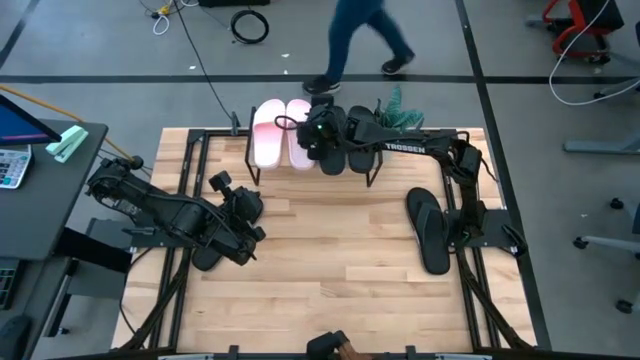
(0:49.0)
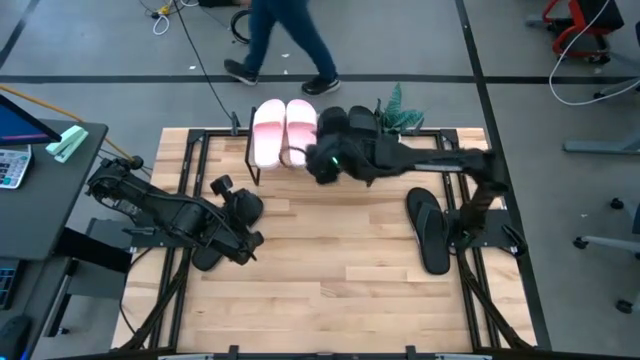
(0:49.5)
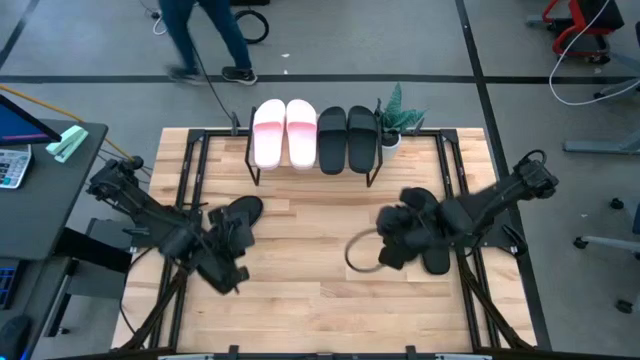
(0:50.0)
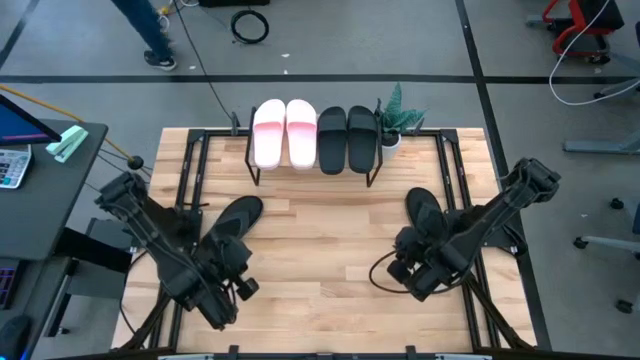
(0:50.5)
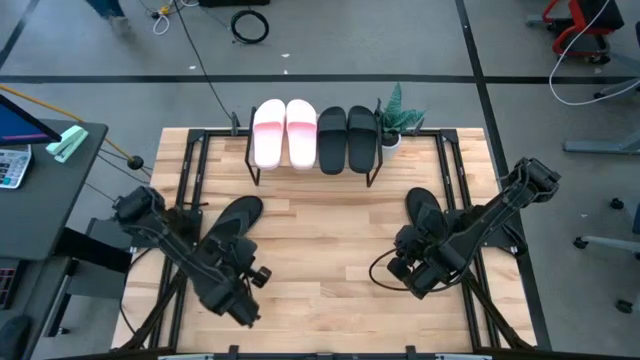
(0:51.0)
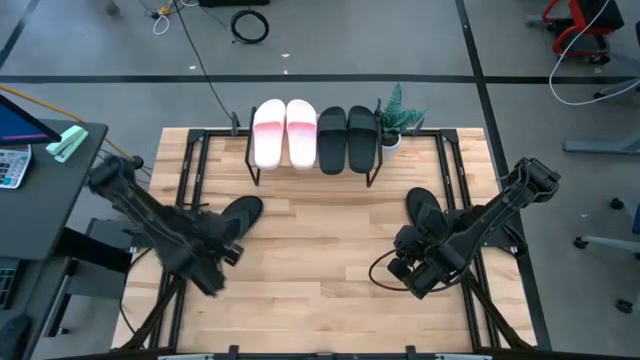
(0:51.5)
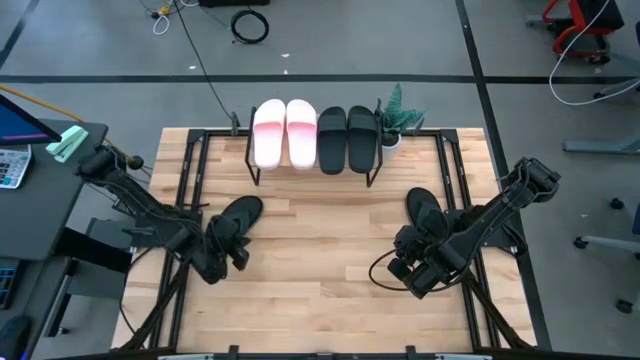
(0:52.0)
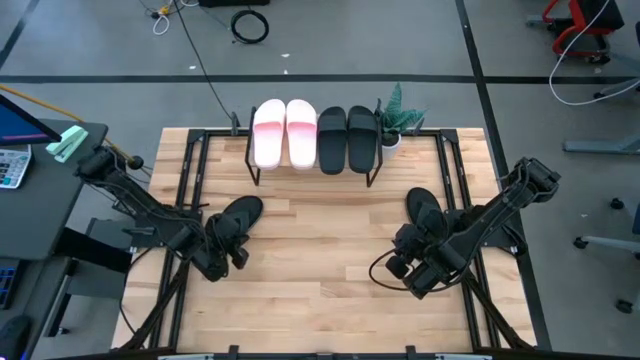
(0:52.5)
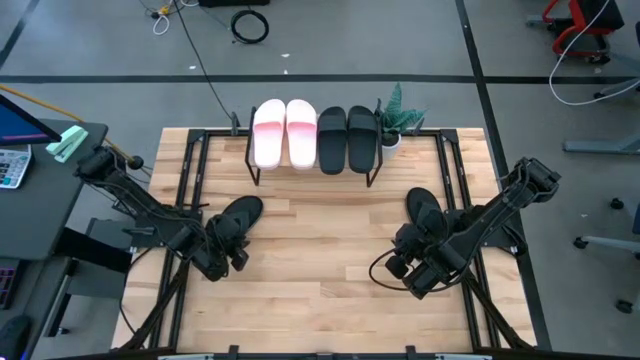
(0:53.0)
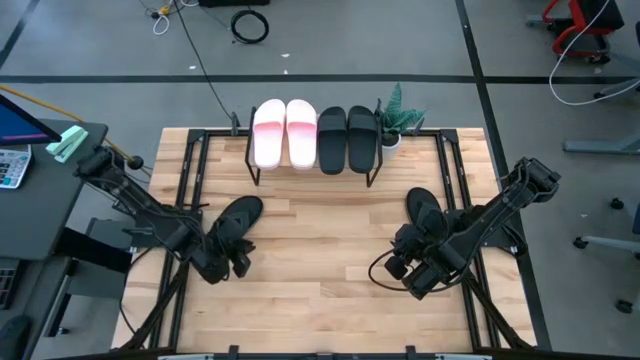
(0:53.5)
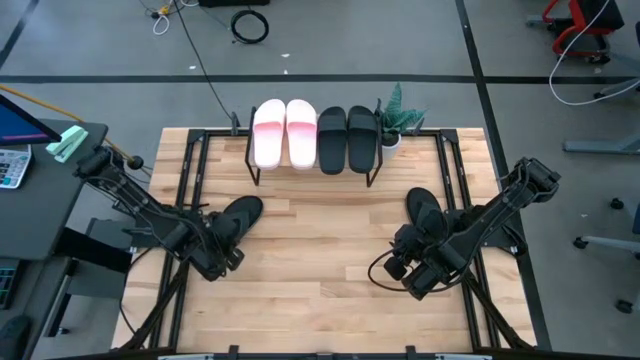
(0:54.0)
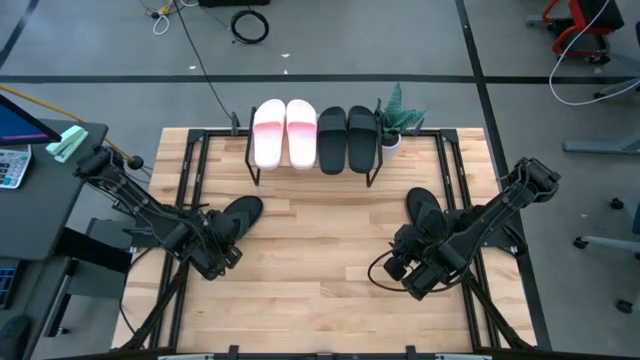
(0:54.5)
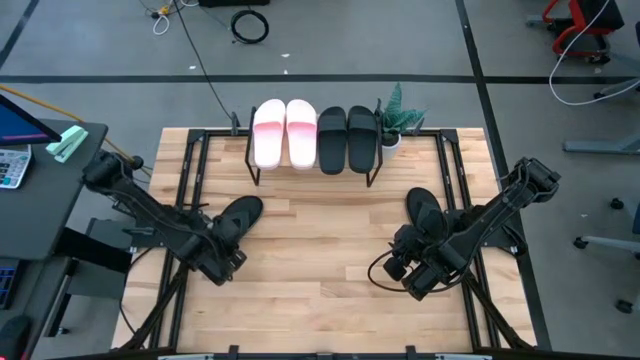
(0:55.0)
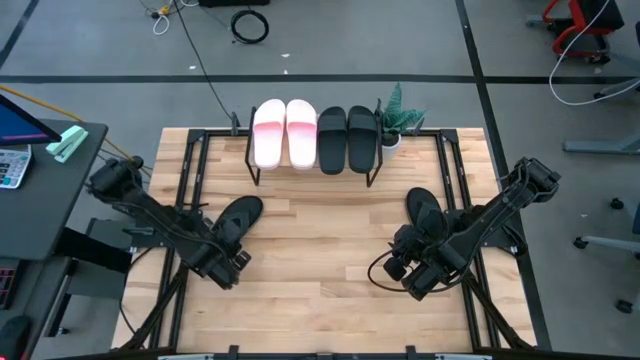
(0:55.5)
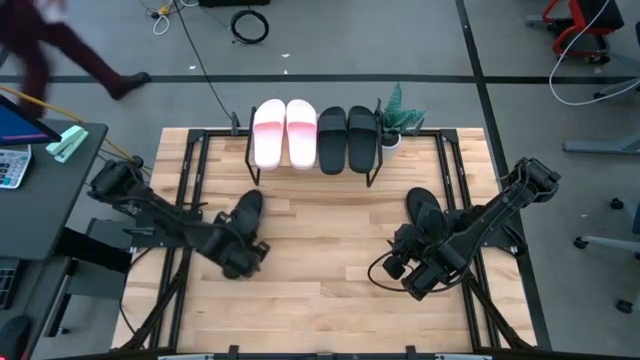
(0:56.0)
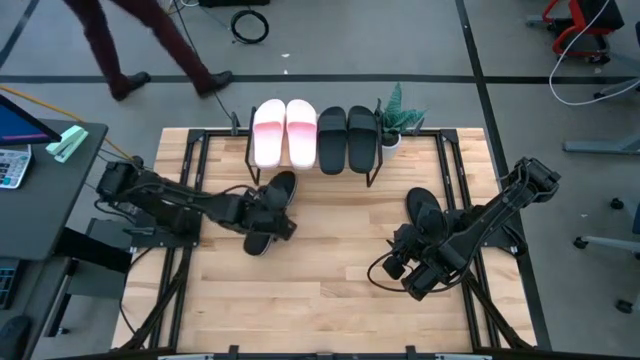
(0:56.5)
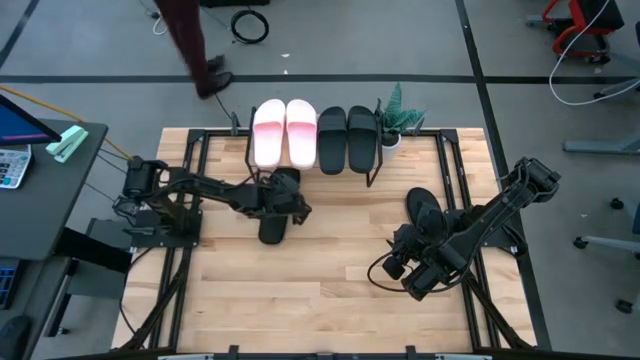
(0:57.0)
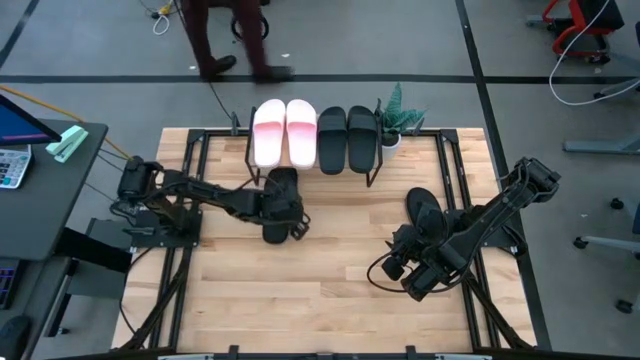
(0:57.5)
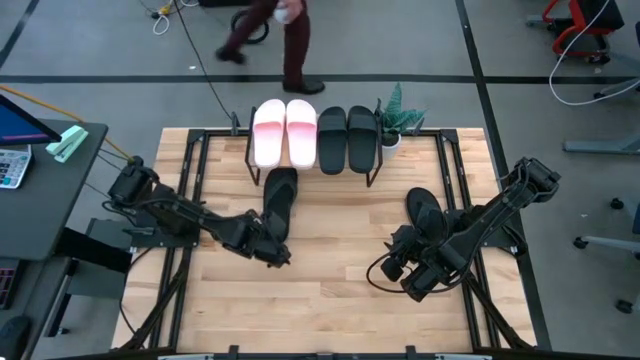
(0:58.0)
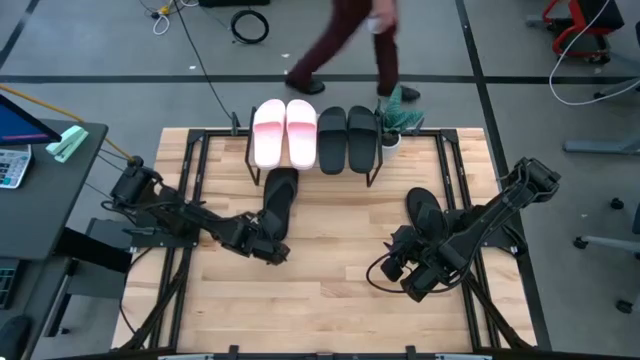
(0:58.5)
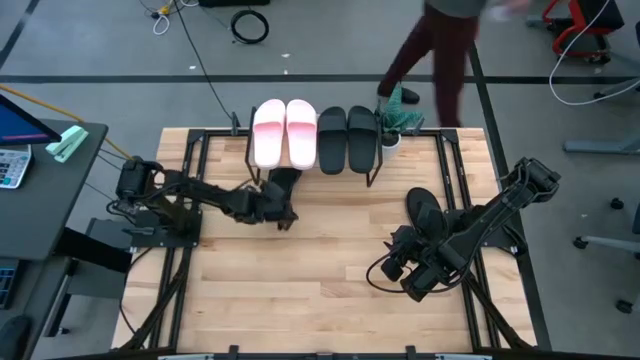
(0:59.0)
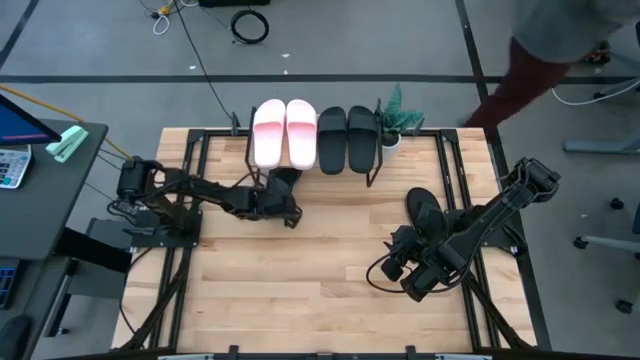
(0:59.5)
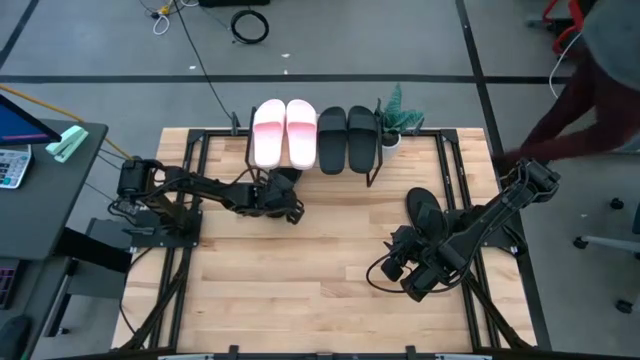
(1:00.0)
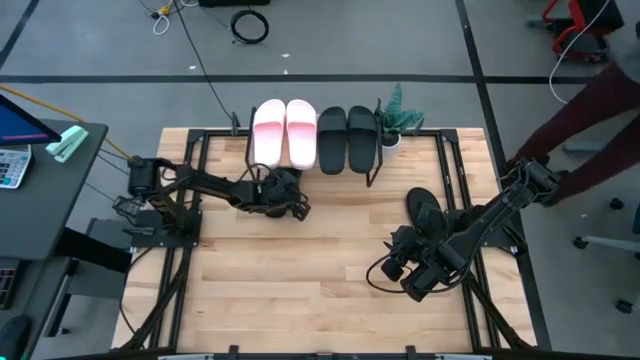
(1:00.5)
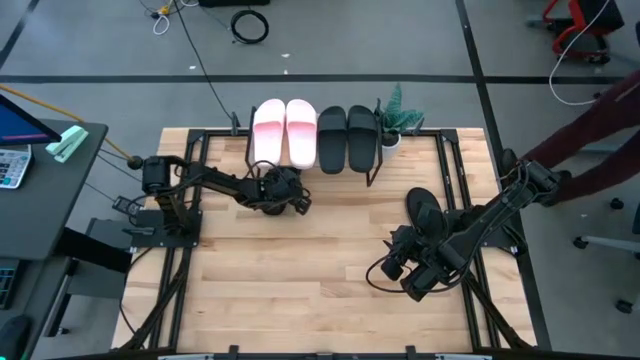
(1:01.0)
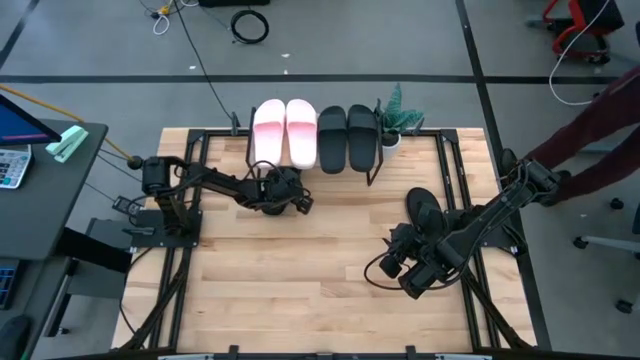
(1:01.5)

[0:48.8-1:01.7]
Task: Pick and place slides into the shelf
Put the left black slipper under the shelf

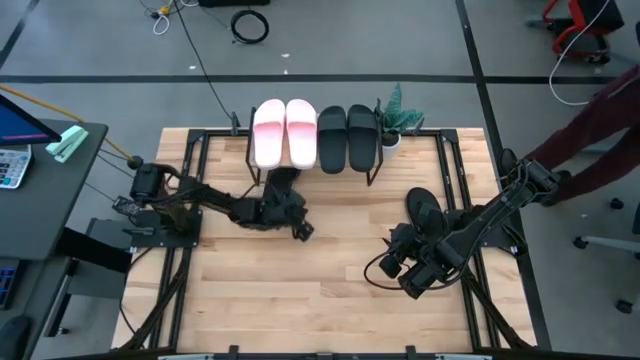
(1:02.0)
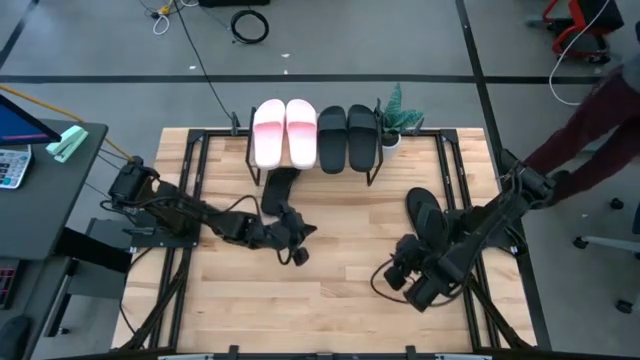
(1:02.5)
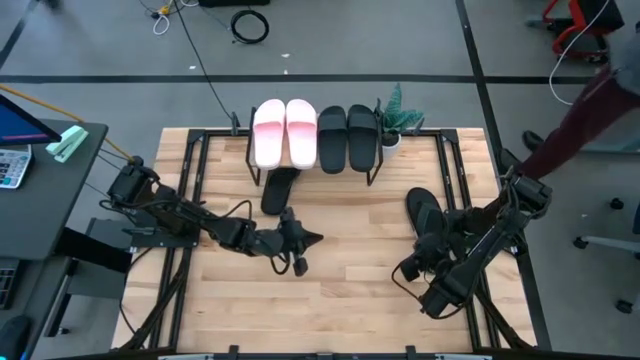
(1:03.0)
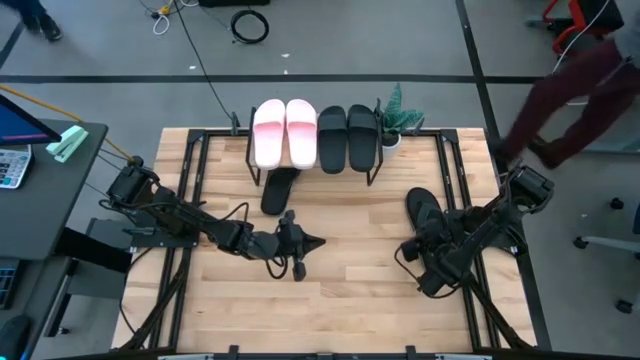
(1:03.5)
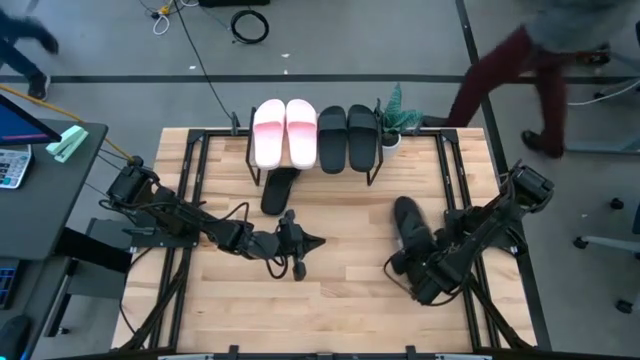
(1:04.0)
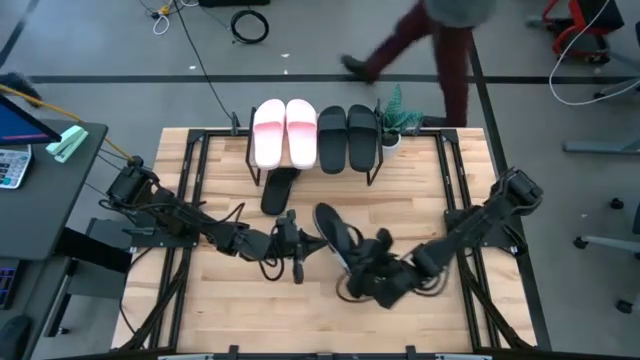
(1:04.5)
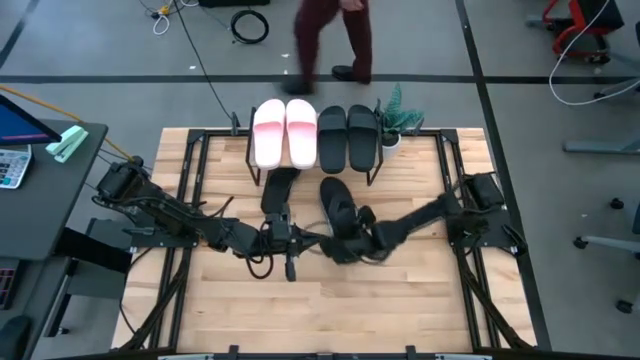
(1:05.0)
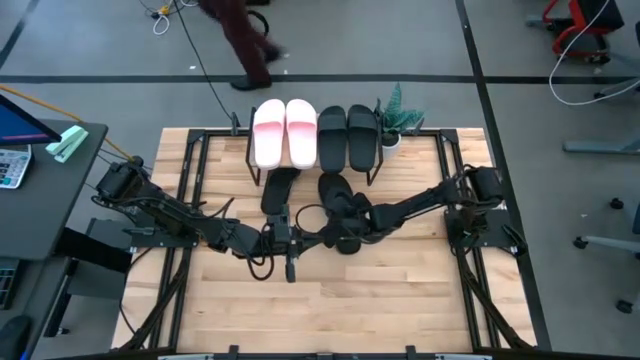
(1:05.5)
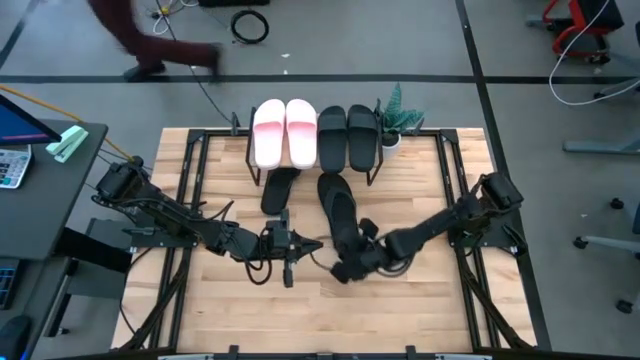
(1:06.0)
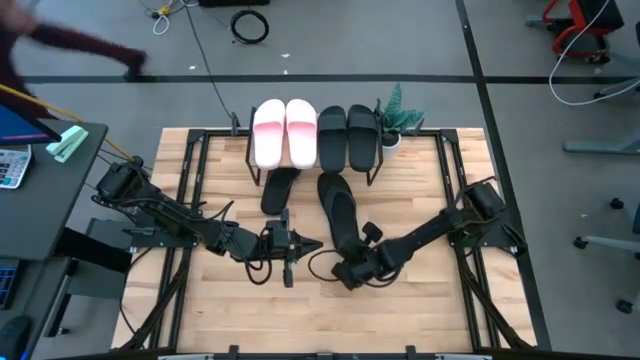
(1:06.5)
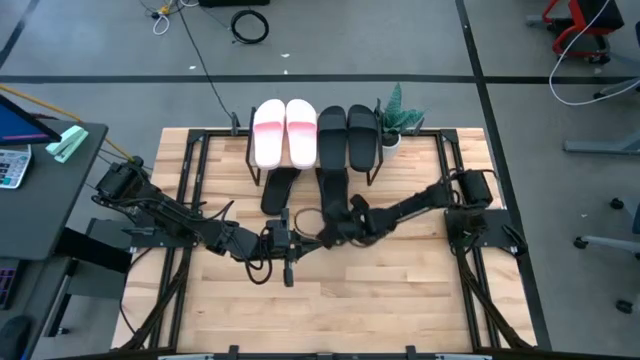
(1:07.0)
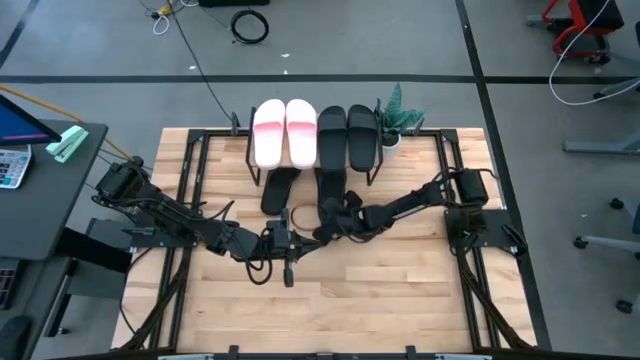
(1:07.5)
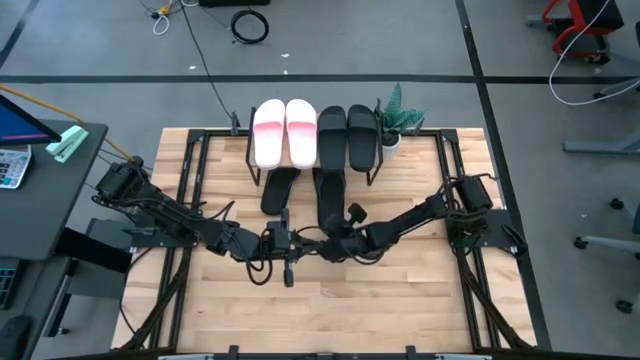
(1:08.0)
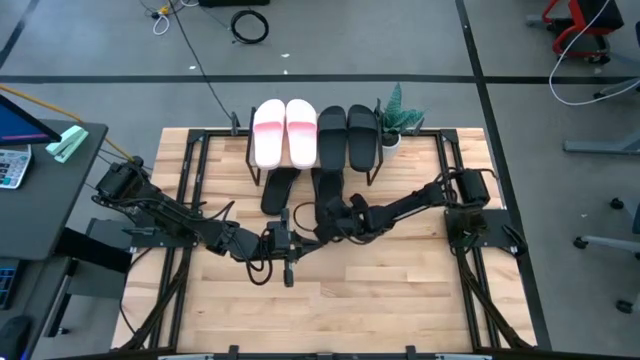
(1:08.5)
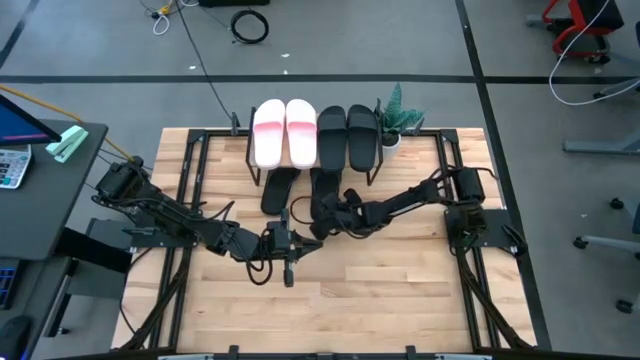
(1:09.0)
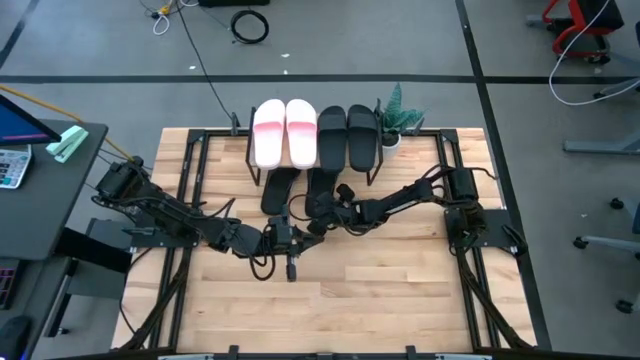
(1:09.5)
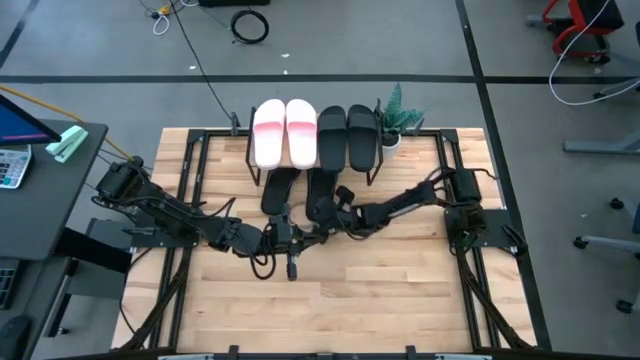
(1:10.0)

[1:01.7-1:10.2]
Put the black slipper under the shelf
